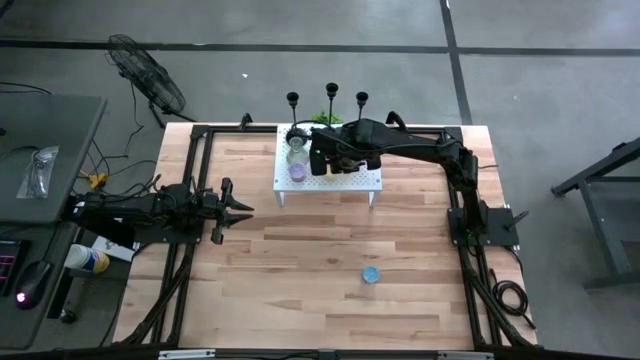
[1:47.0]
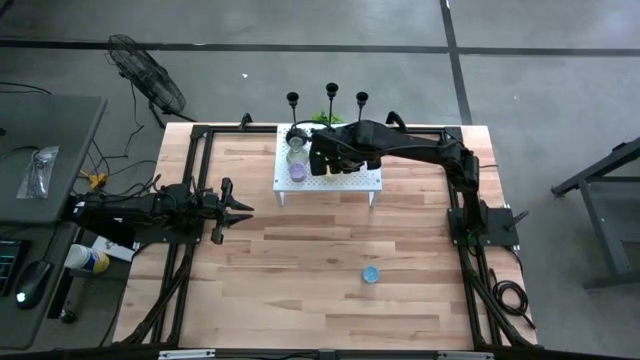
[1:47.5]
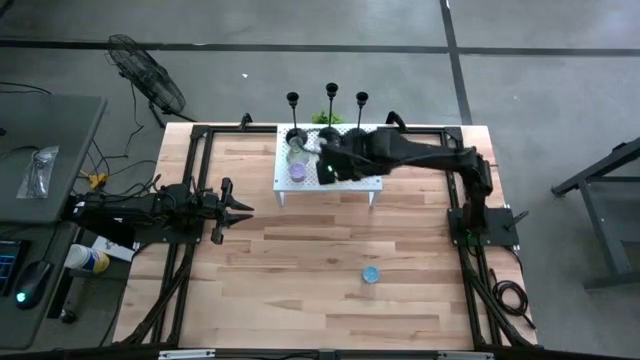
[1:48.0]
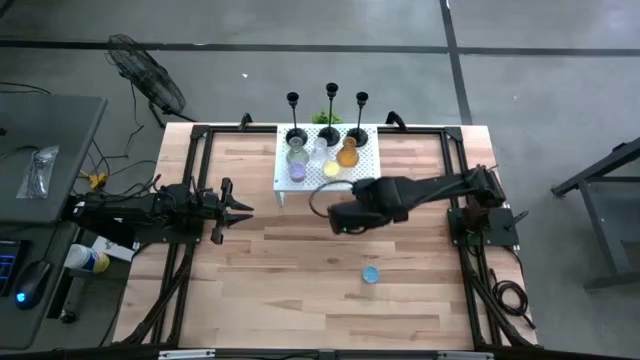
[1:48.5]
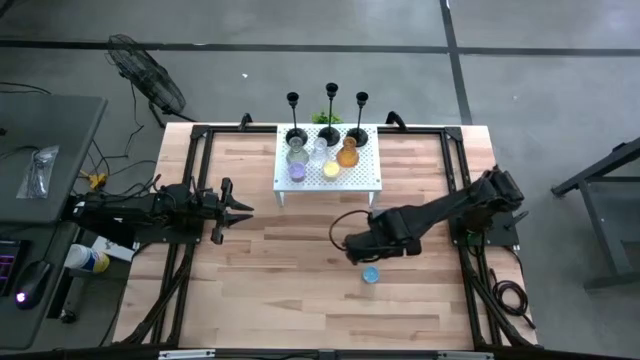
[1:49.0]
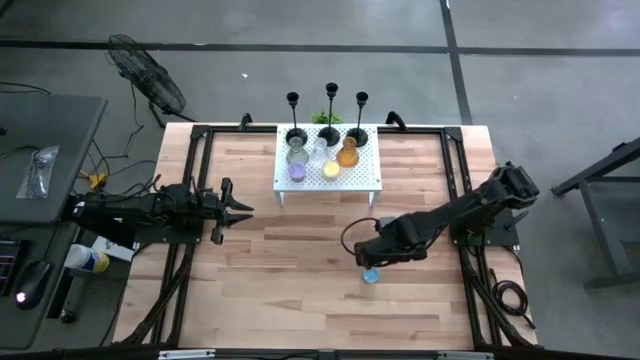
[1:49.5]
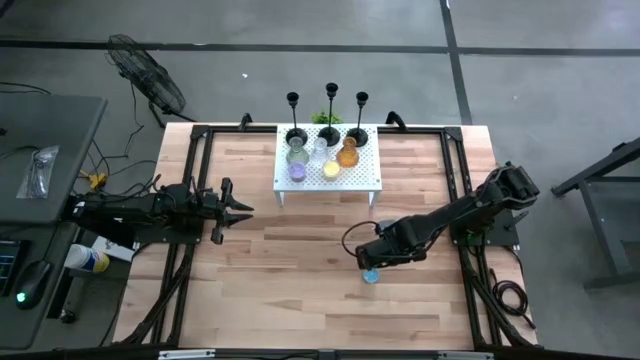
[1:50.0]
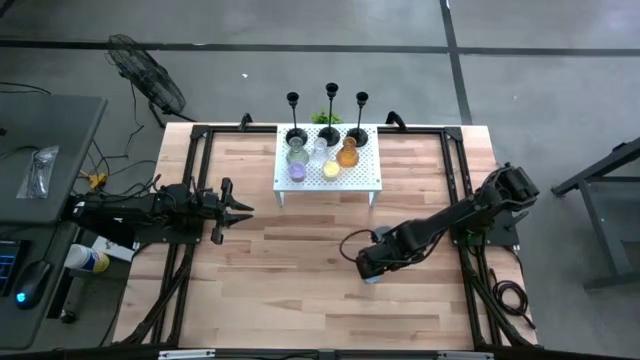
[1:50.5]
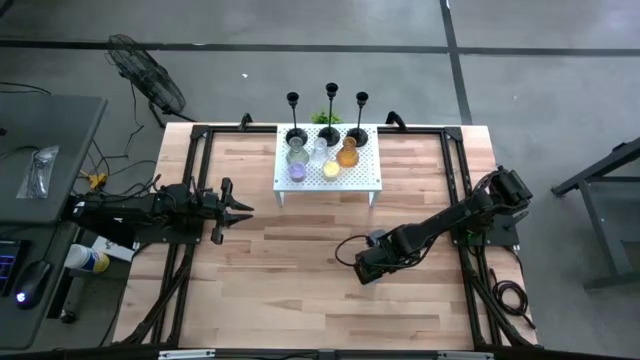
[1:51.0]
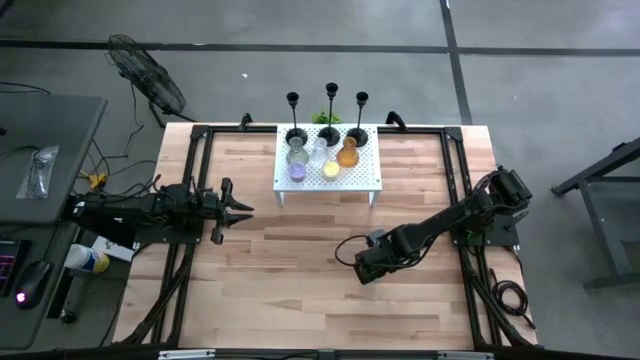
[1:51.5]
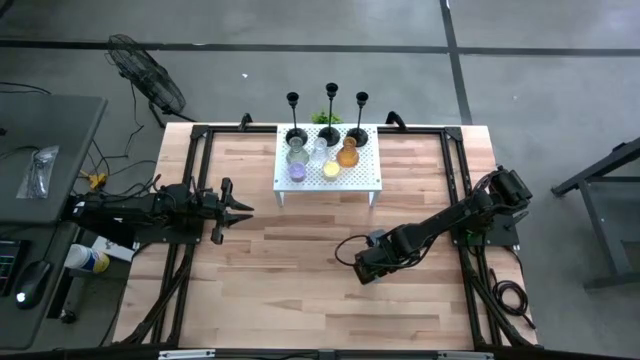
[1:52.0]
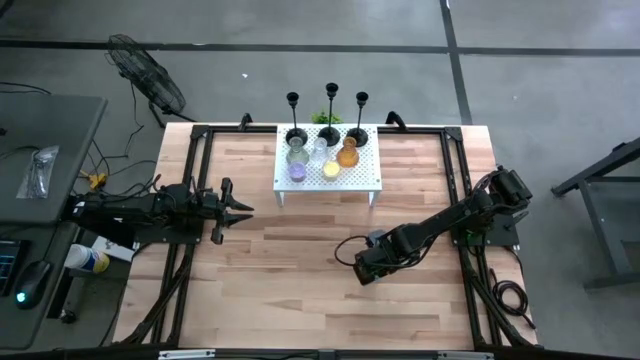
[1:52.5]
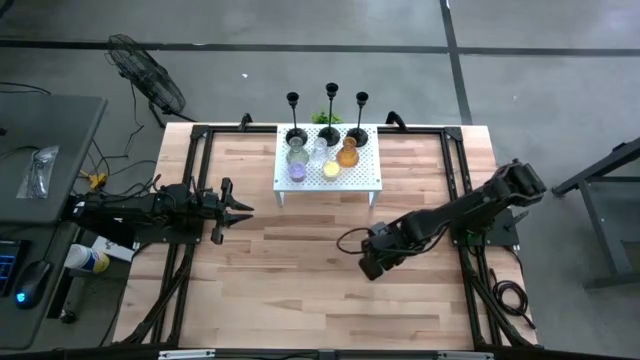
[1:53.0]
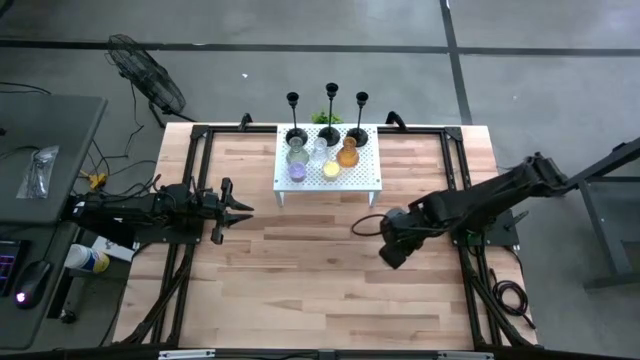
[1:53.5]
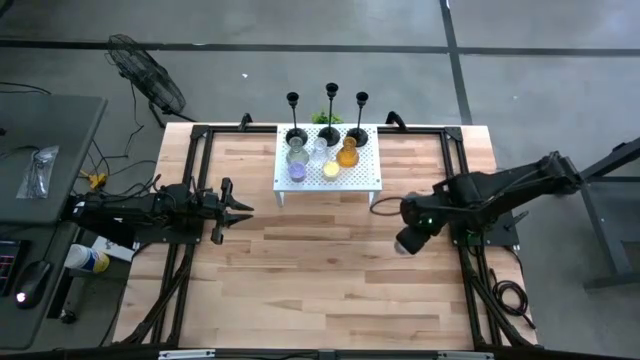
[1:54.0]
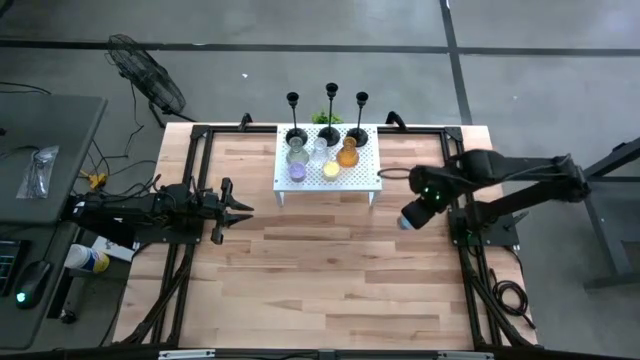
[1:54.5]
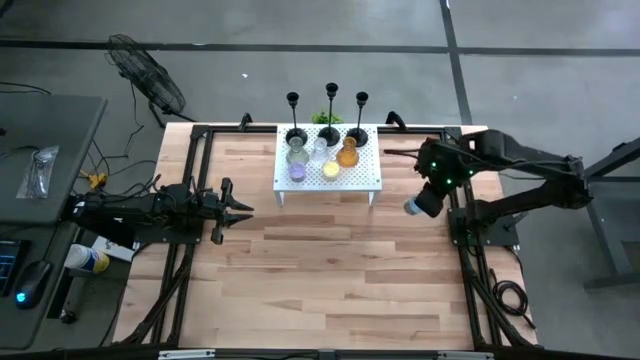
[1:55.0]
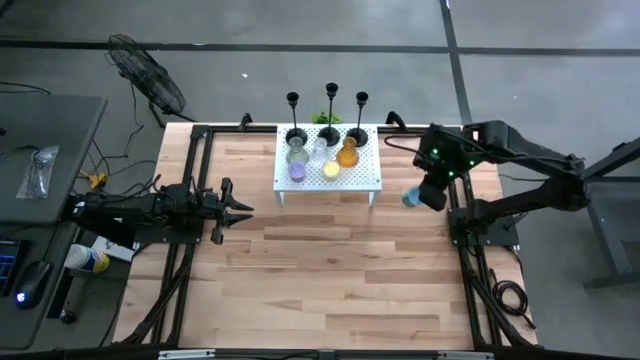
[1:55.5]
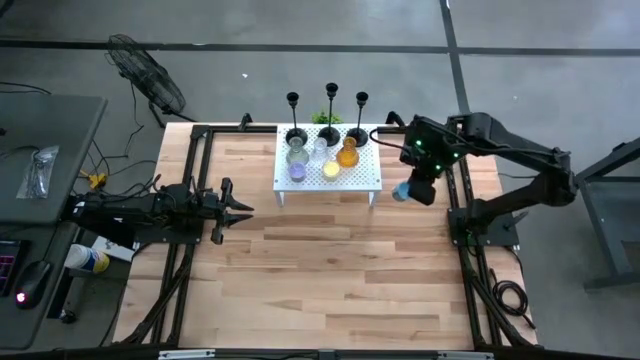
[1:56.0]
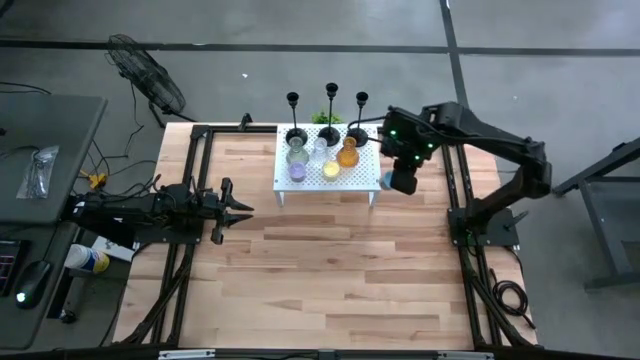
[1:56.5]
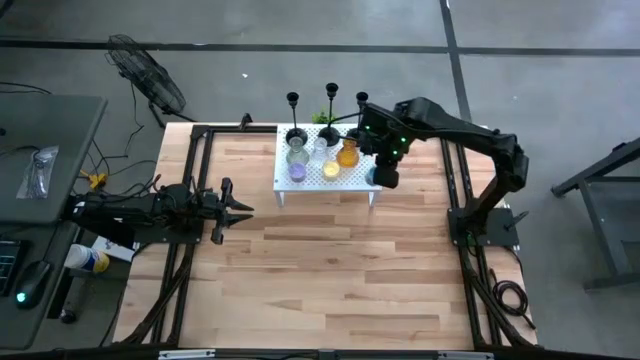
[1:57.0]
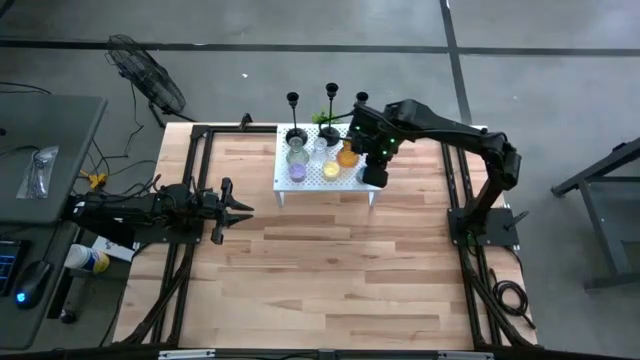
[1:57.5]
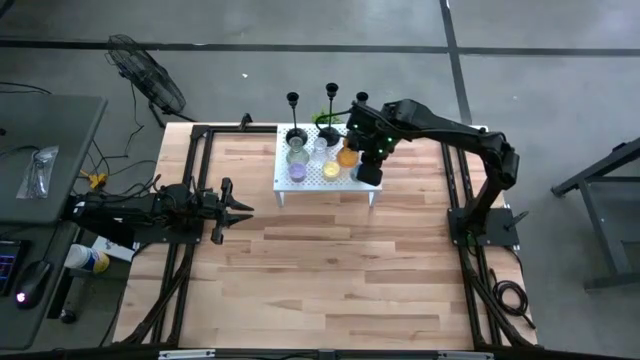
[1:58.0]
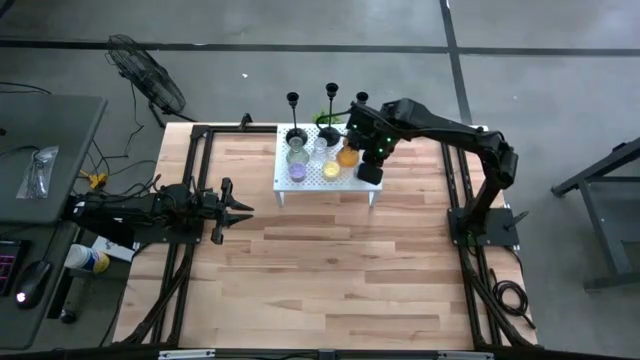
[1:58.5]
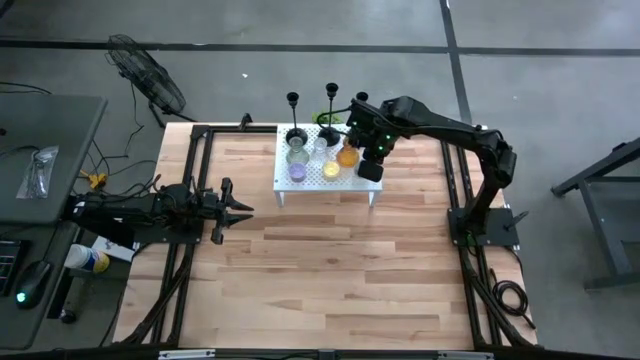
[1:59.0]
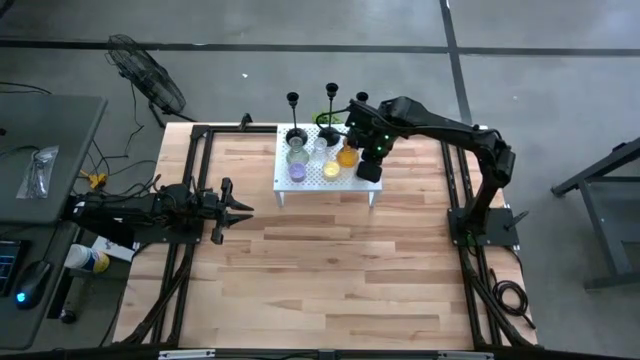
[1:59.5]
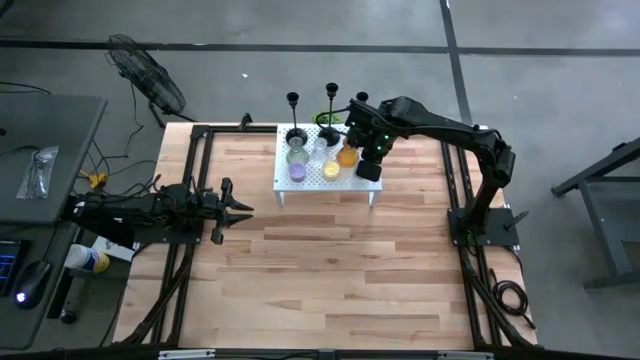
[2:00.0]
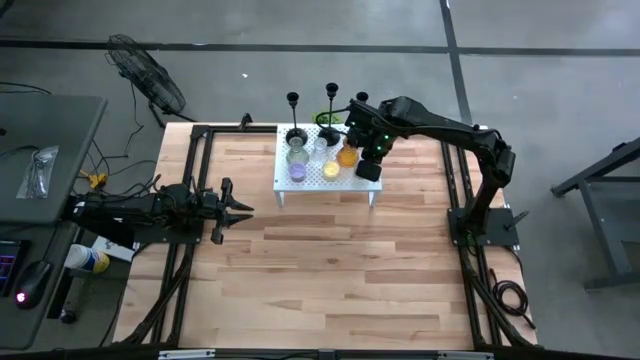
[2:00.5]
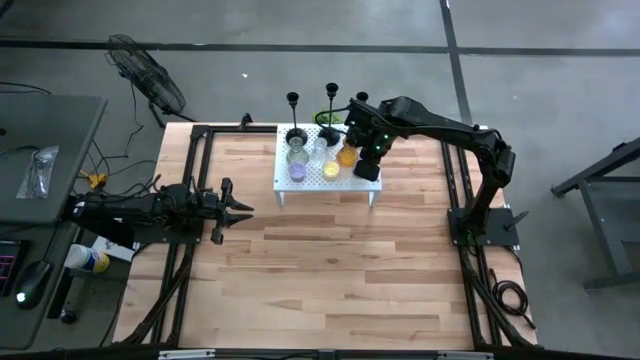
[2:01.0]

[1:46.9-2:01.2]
Task: Pick & Place candle stick holders
Put the blue scented candle on the shelf aligned with the yellow scented candle

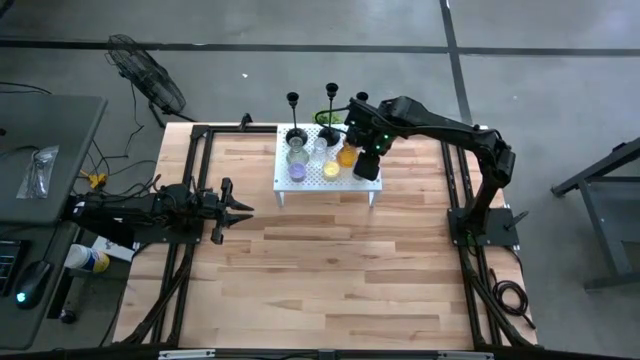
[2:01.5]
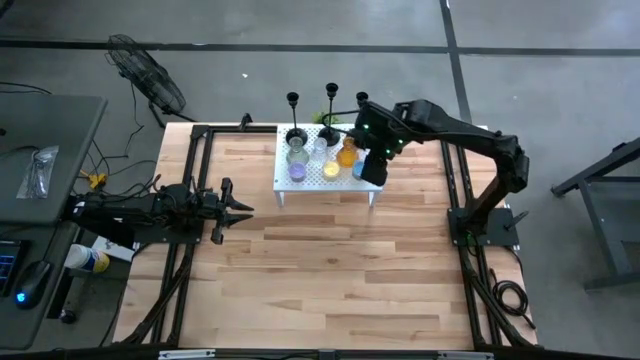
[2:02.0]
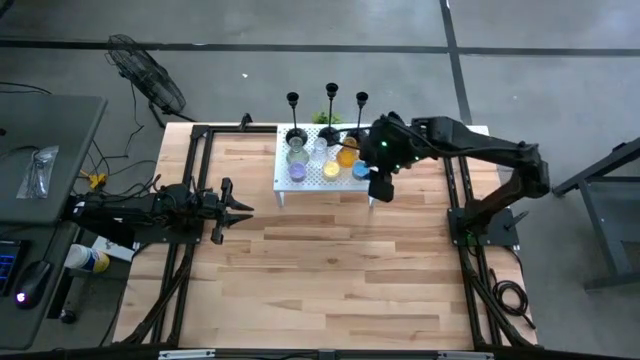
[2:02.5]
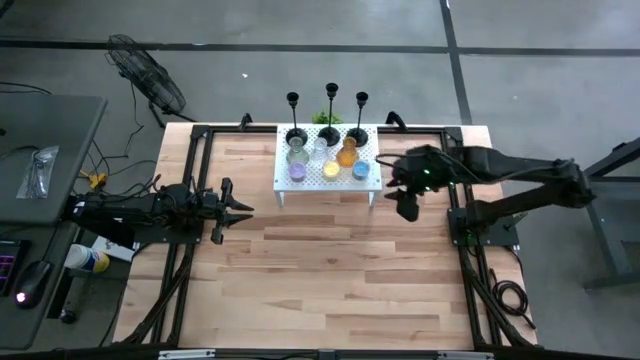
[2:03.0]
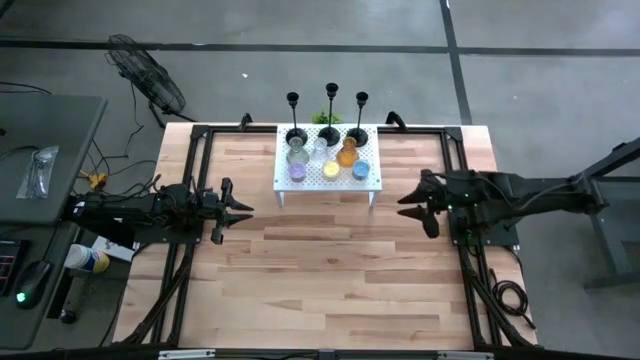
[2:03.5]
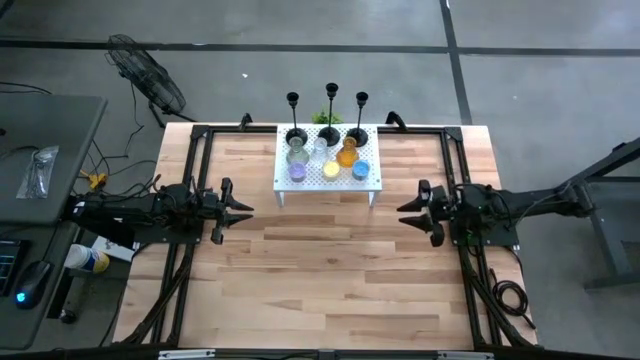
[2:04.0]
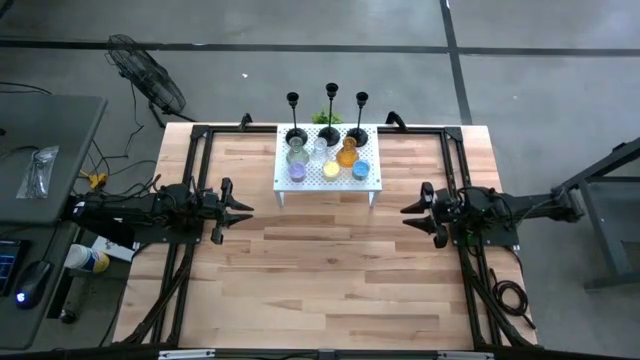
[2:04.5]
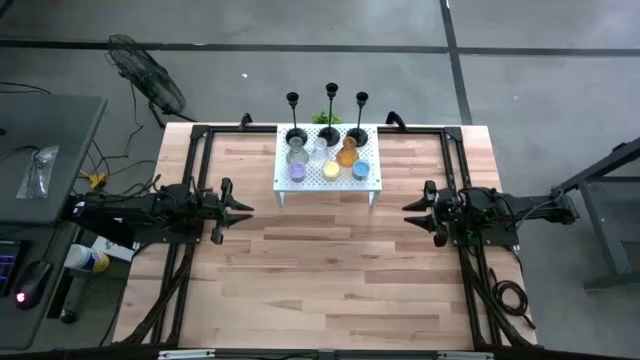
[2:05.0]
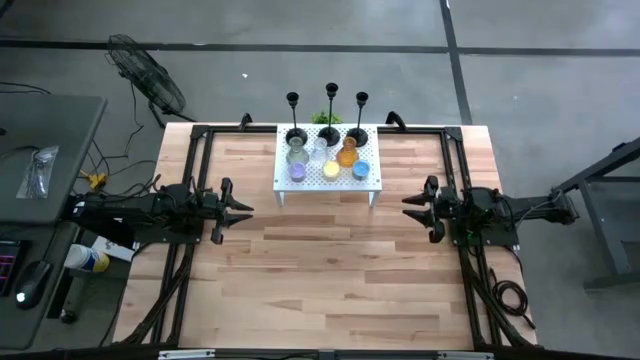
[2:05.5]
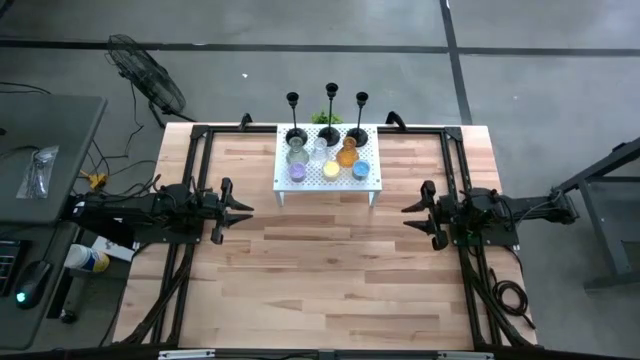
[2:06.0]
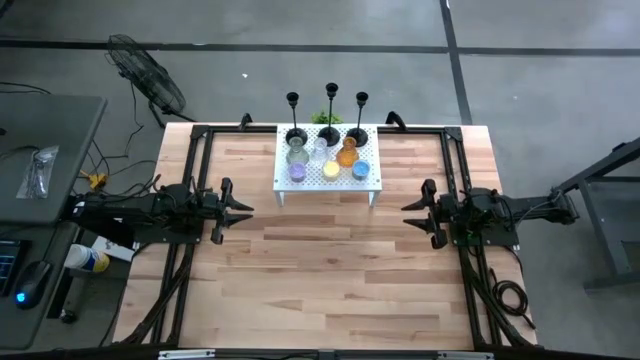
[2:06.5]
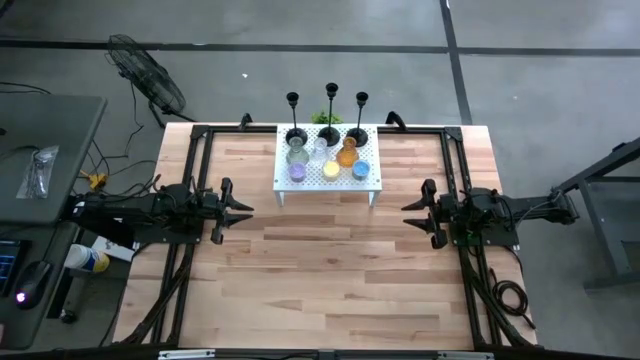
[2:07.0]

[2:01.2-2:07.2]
Return to Home Position
